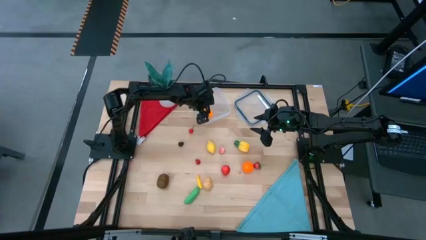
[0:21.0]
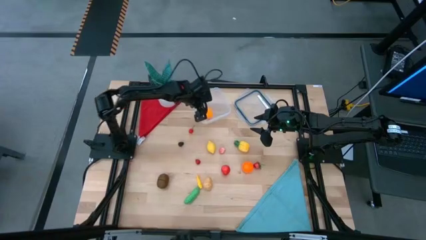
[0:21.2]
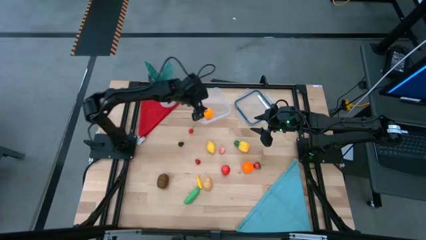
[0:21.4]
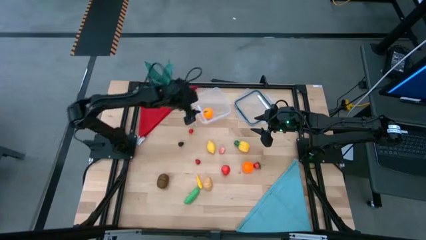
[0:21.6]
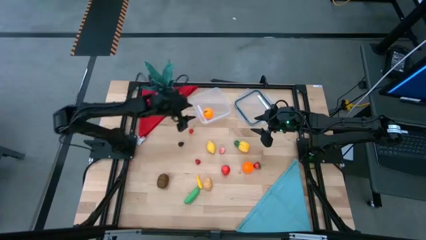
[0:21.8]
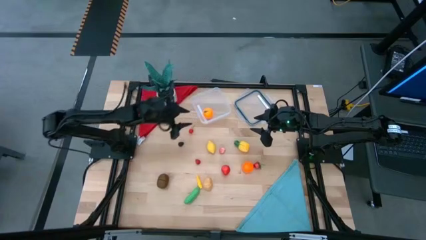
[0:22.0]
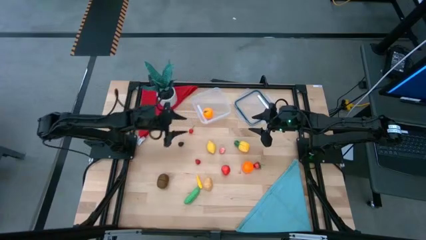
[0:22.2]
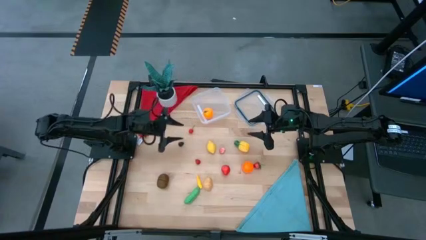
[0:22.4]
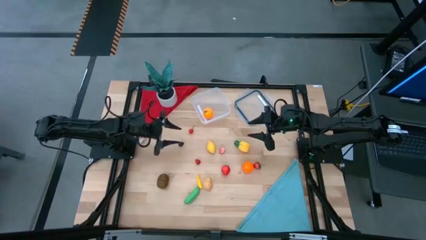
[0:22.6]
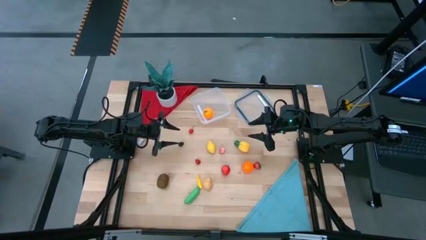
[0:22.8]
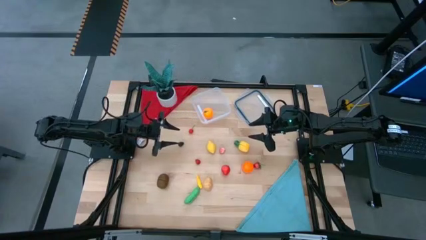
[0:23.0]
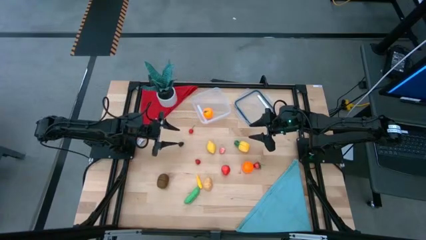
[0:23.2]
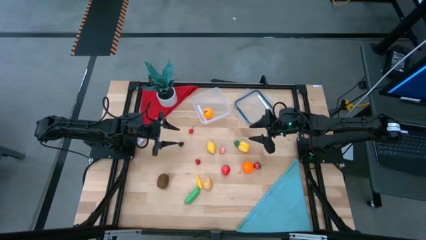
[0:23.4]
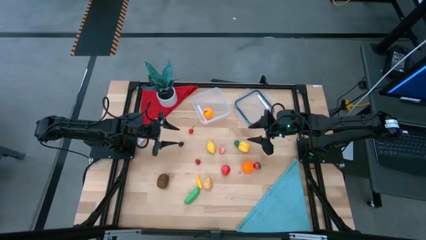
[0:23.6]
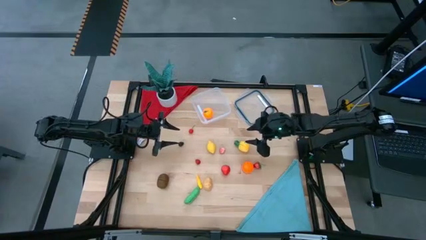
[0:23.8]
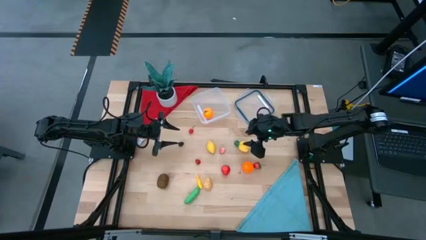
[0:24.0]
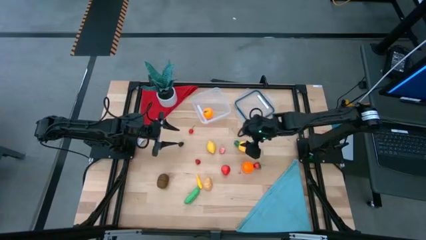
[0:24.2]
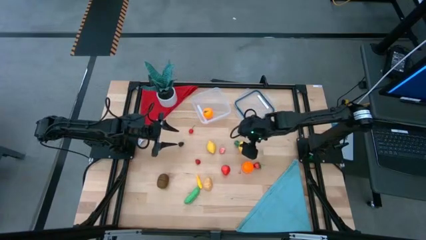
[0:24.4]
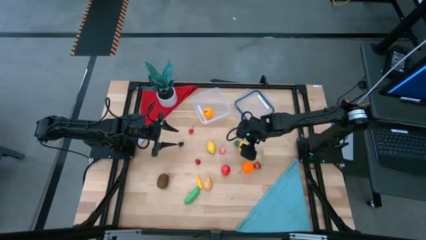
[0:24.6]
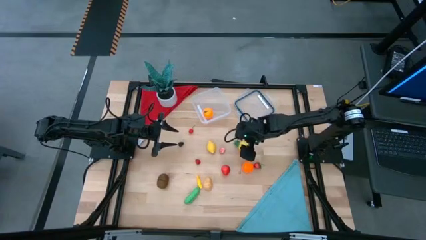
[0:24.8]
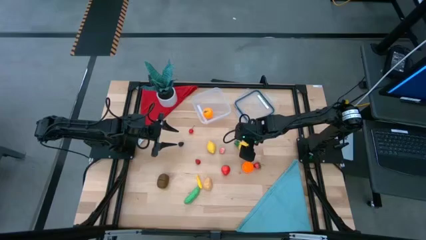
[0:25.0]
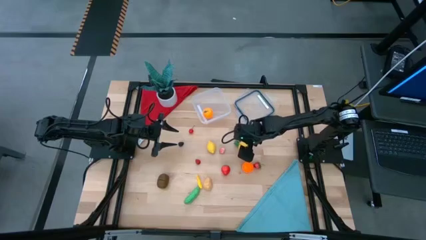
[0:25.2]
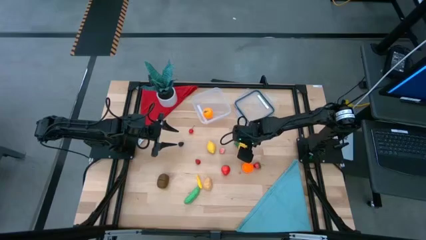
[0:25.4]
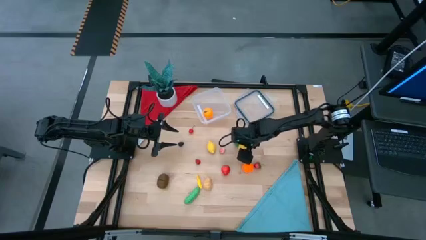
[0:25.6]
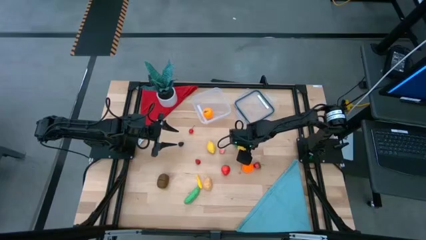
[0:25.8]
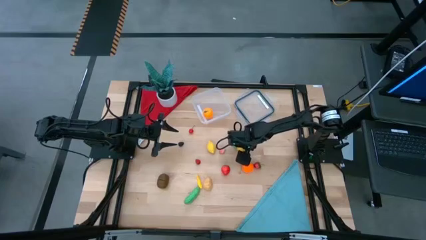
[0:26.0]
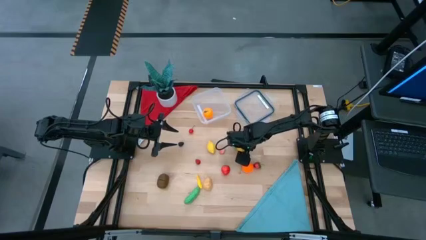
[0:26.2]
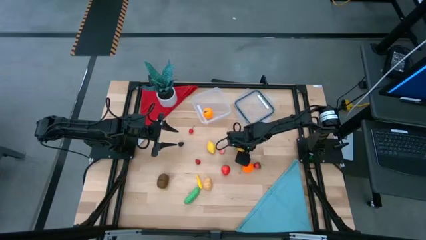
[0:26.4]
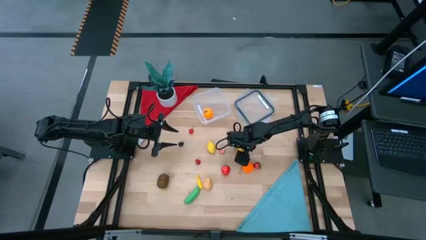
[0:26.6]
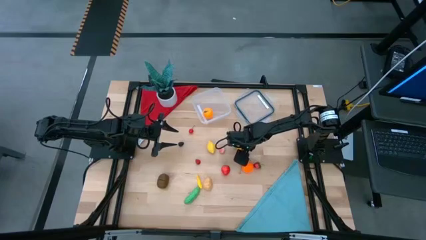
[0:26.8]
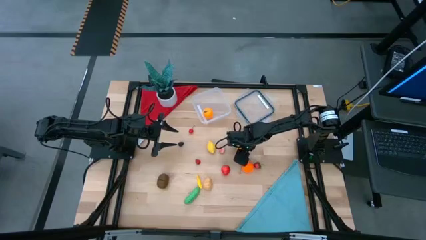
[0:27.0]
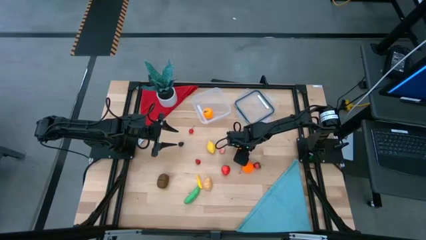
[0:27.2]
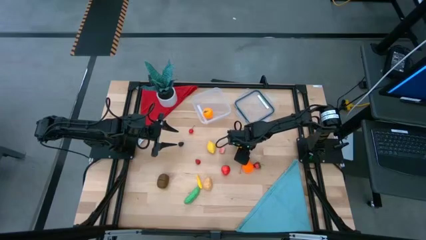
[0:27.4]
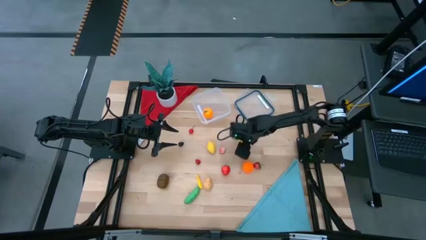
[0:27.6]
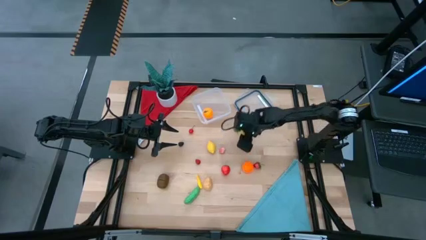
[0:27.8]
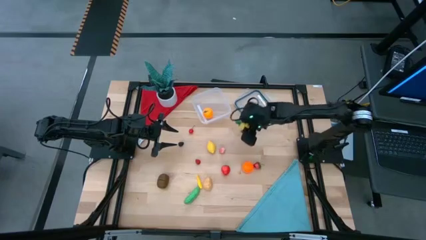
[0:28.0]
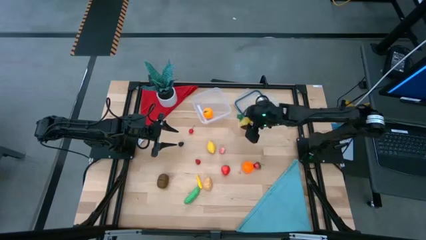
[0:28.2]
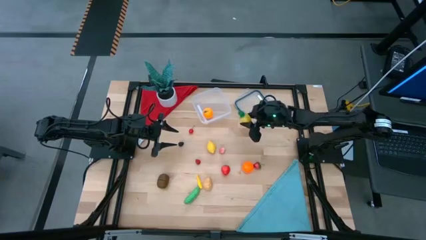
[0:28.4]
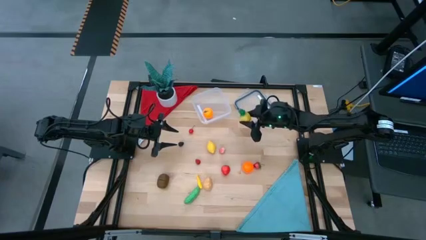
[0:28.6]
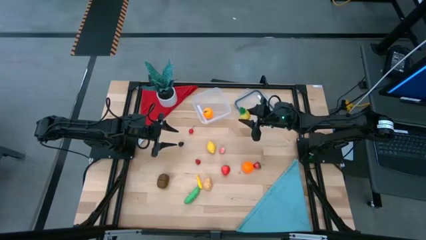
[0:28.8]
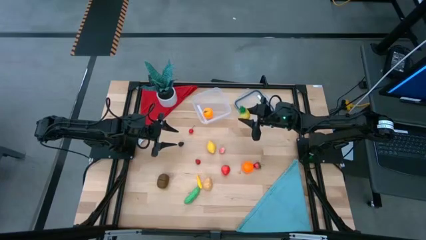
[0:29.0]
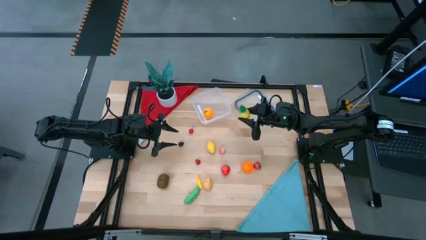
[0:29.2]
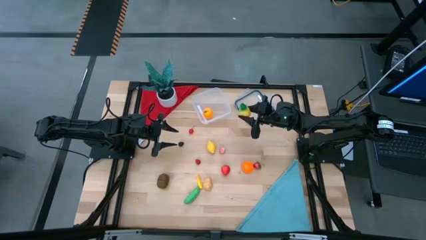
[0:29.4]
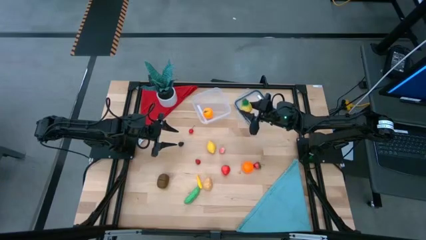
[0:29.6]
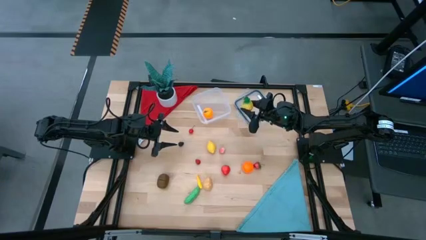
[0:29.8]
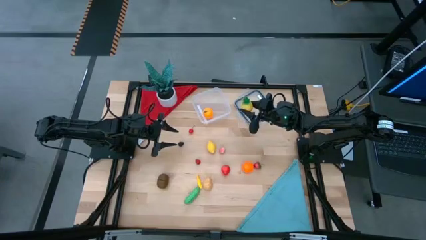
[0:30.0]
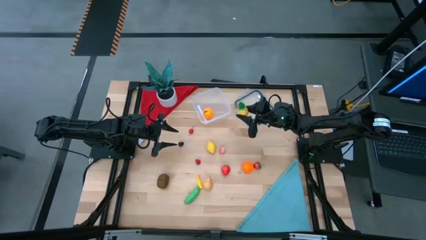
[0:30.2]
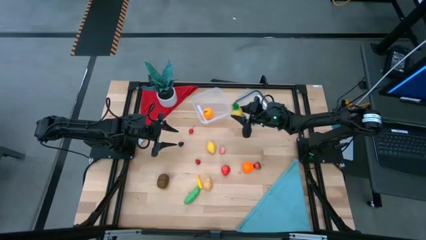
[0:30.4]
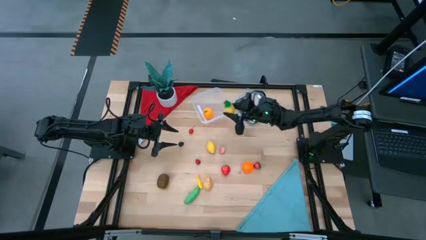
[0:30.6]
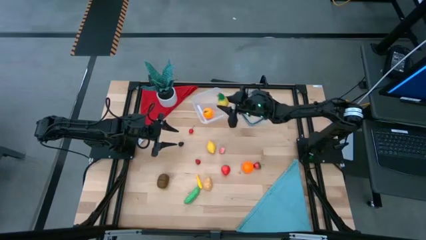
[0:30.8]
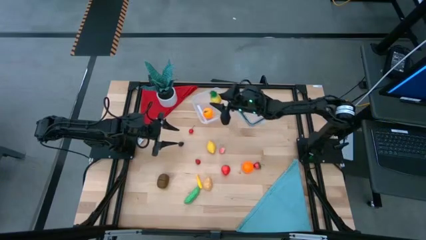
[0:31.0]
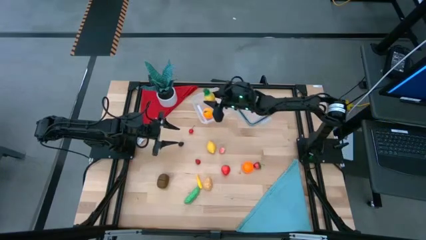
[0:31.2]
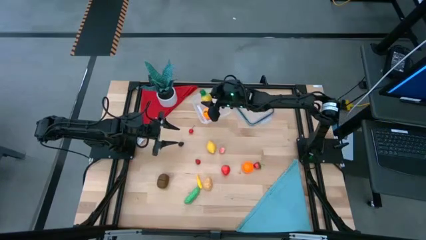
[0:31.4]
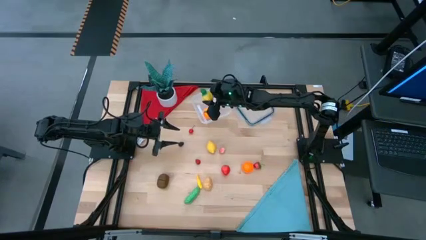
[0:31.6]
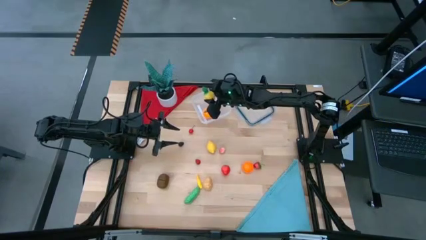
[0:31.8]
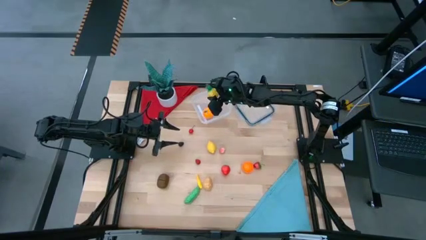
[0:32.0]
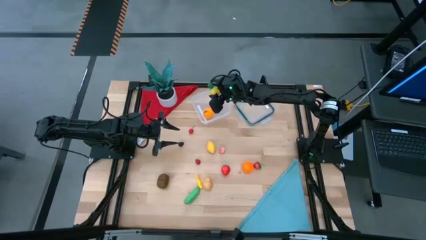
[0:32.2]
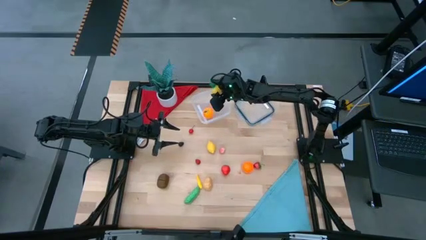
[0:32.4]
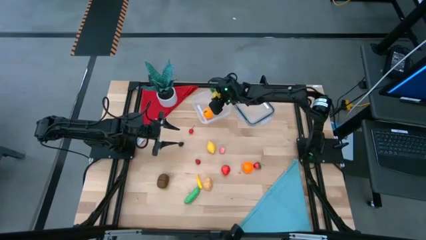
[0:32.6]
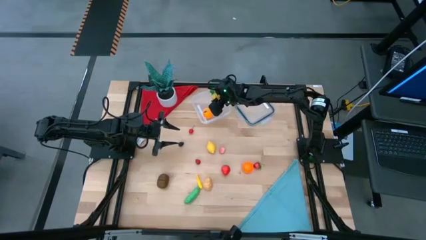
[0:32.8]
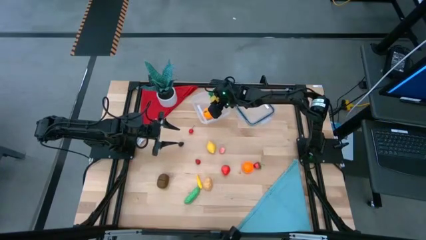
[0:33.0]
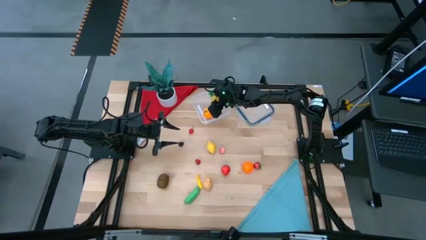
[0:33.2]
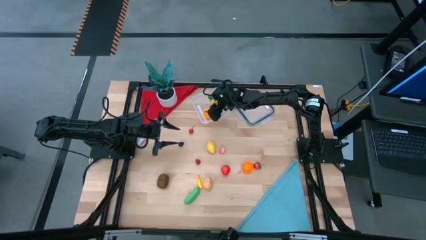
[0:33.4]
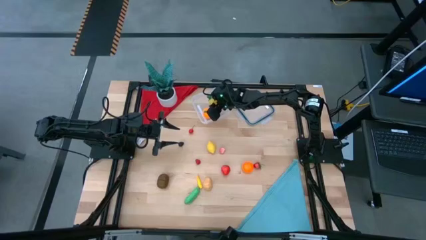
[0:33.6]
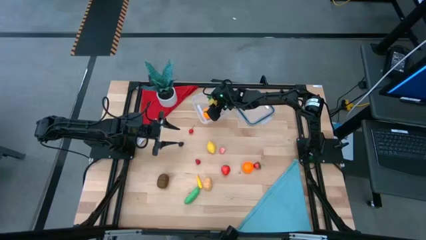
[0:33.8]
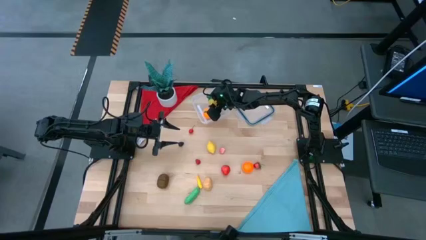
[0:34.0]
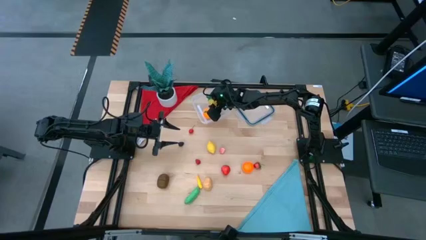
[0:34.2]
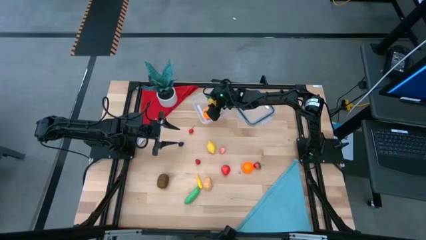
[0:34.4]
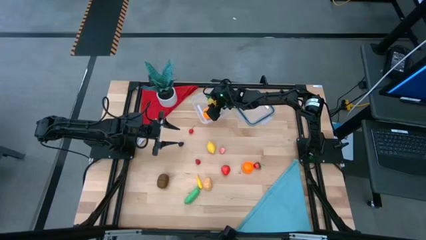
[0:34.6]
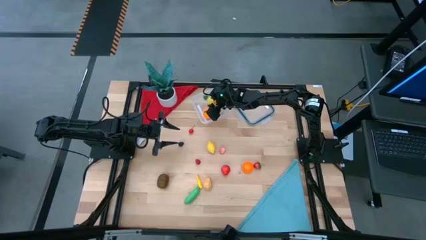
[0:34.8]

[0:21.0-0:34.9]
Task: Pick and placing Produce into tupperware
Put the yellow pineapple into the transparent container

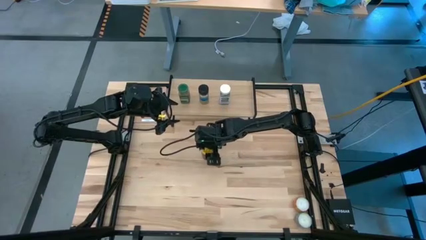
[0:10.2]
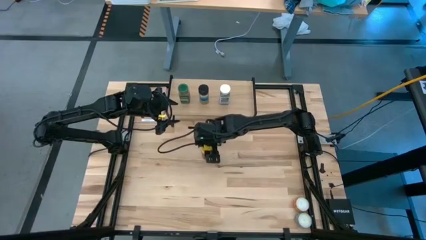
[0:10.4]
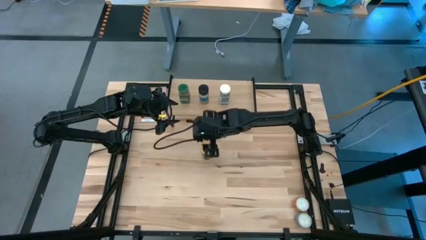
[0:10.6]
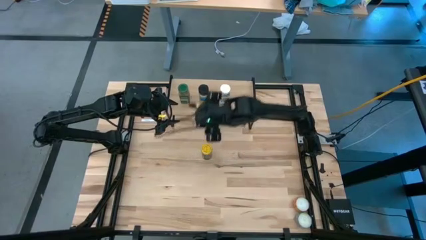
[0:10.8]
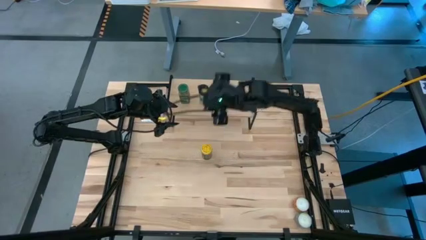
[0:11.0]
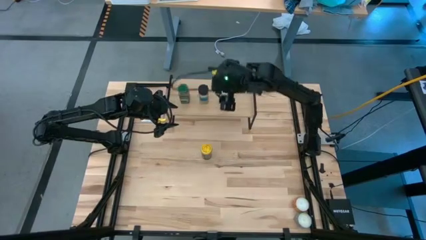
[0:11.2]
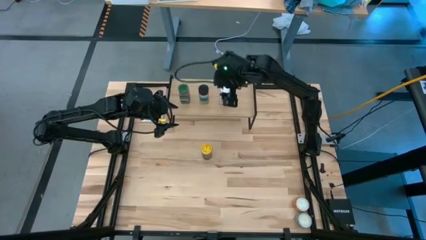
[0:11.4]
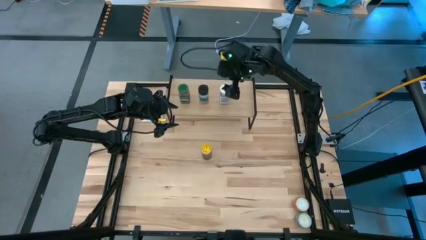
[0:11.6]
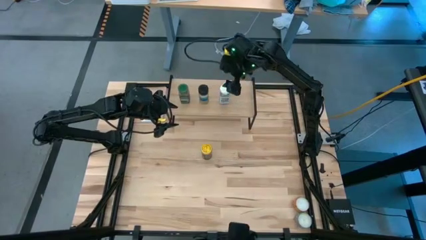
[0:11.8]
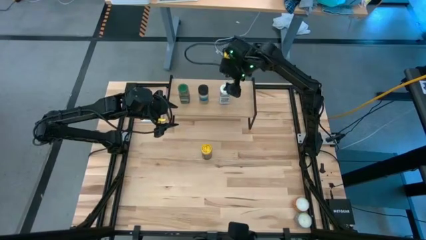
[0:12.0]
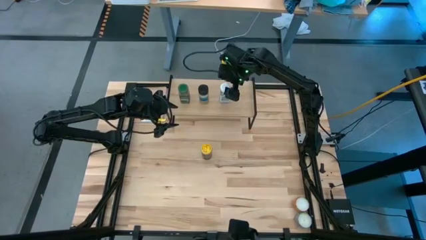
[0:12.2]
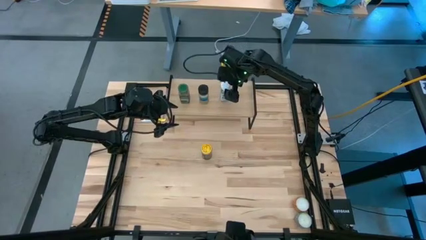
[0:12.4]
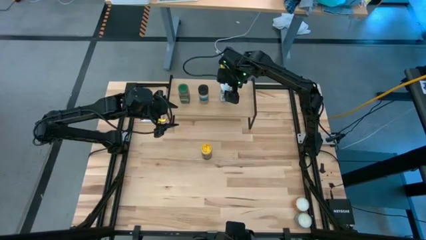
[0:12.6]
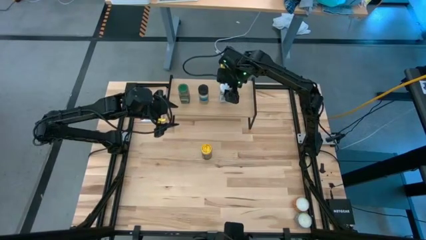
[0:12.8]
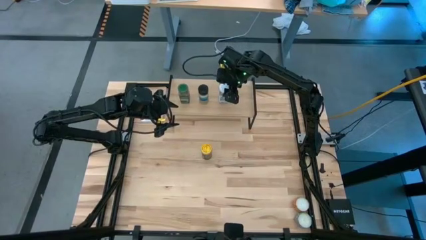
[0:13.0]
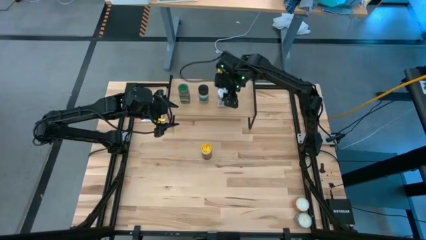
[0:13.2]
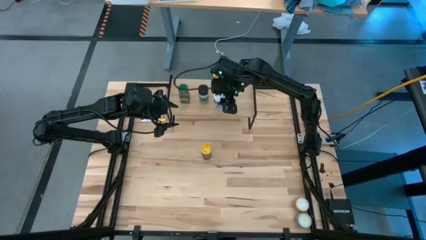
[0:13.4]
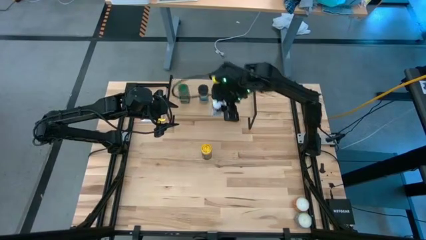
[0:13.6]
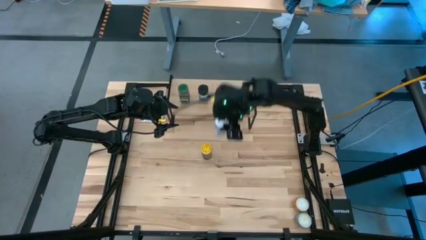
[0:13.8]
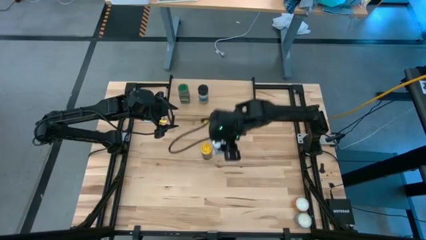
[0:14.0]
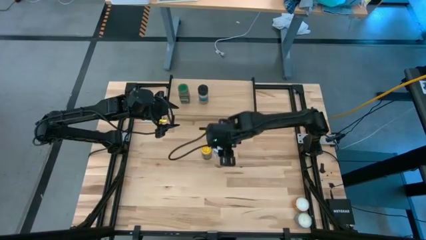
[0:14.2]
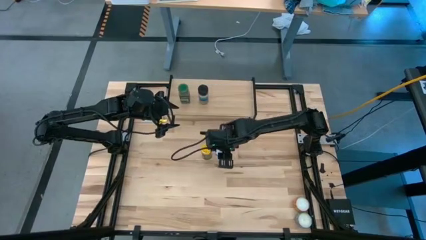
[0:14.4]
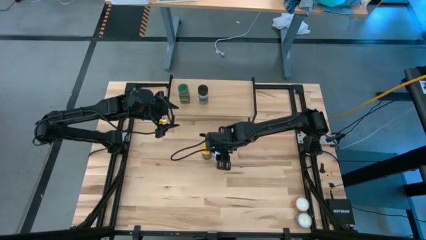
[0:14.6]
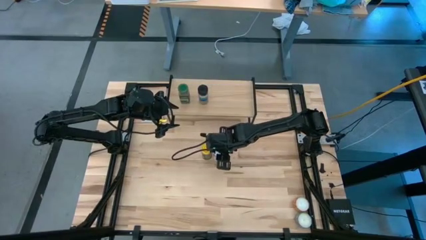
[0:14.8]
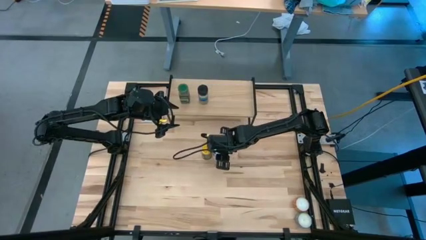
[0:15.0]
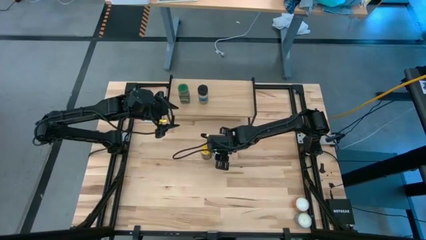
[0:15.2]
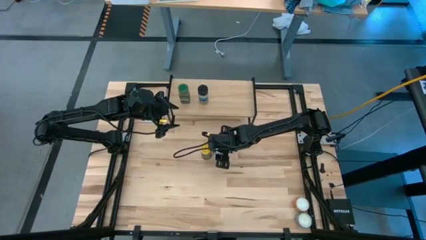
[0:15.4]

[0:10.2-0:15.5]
Task: Shelf spices
Remove the white seasoning bottle from the shelf
